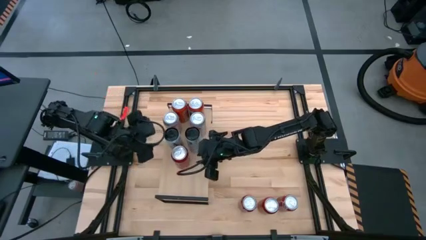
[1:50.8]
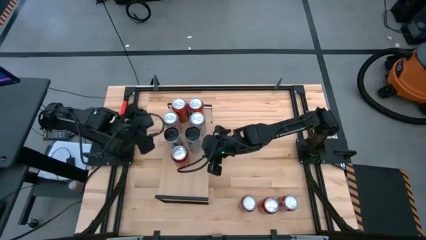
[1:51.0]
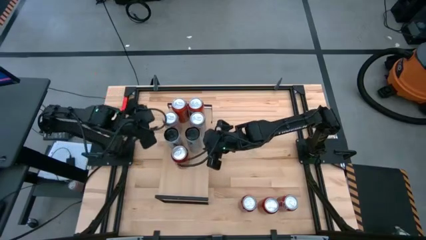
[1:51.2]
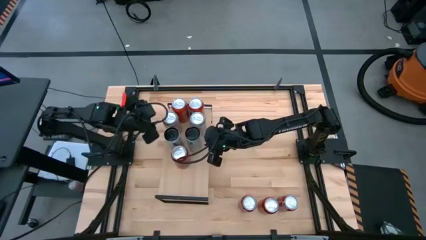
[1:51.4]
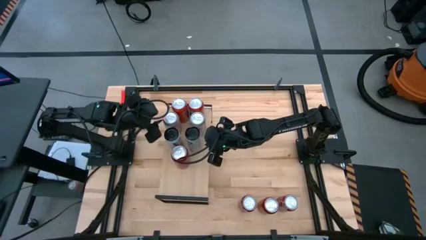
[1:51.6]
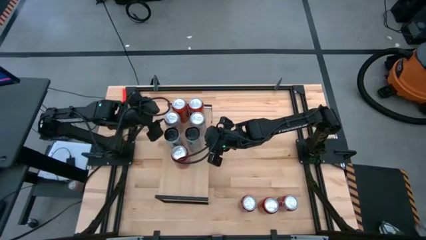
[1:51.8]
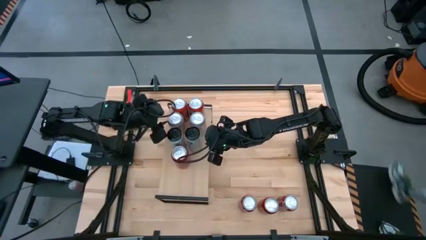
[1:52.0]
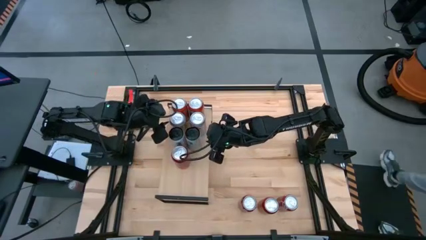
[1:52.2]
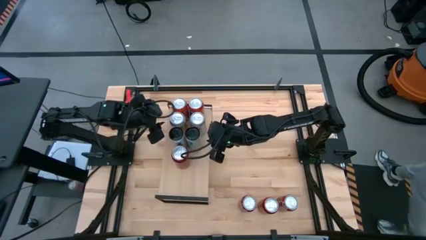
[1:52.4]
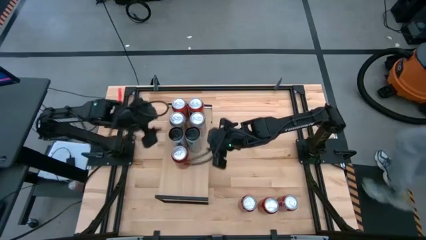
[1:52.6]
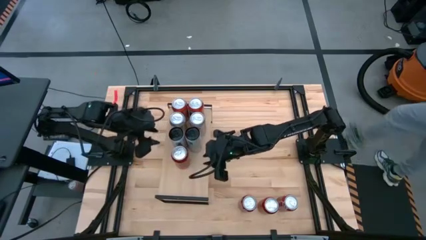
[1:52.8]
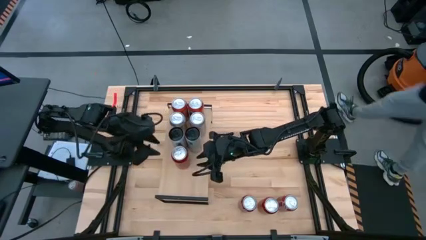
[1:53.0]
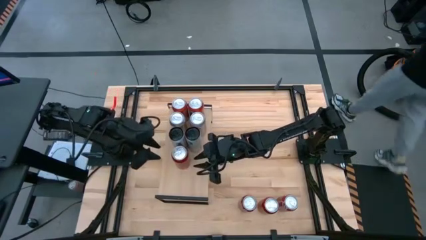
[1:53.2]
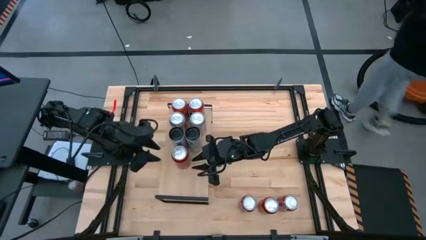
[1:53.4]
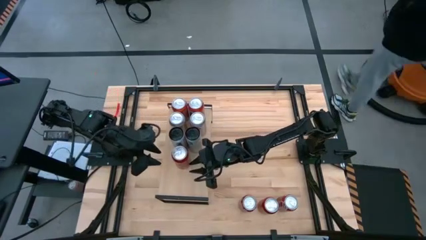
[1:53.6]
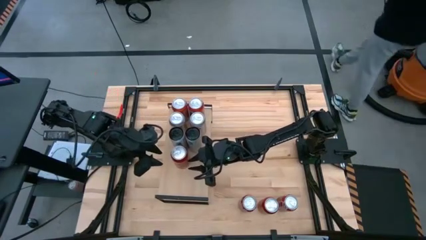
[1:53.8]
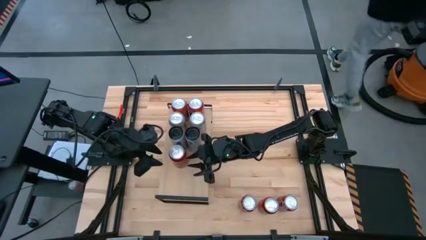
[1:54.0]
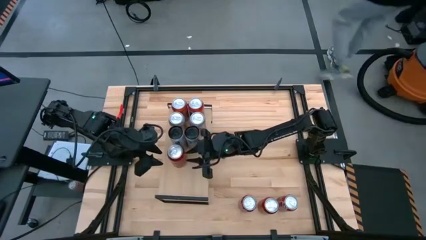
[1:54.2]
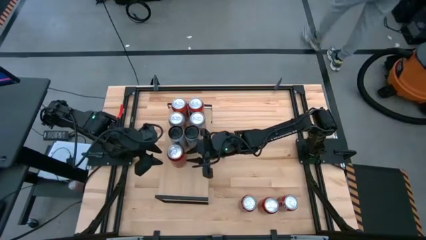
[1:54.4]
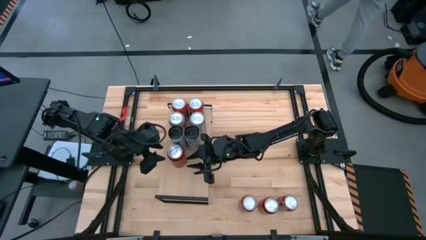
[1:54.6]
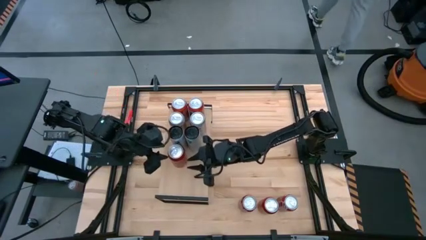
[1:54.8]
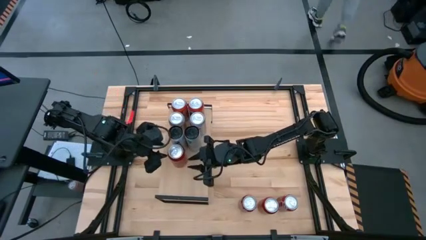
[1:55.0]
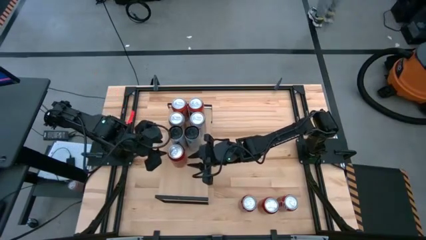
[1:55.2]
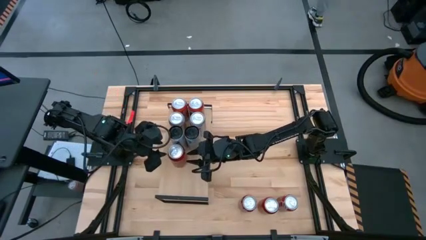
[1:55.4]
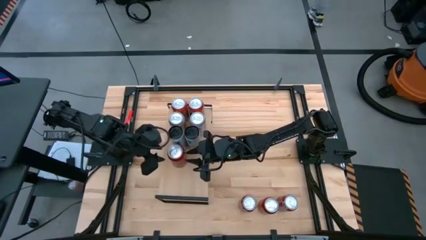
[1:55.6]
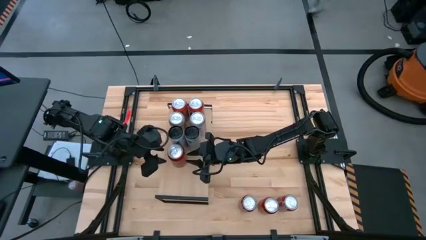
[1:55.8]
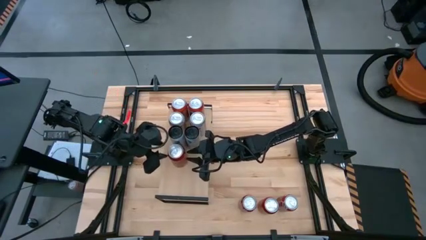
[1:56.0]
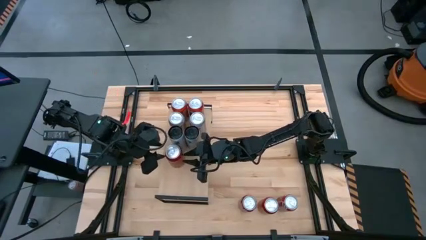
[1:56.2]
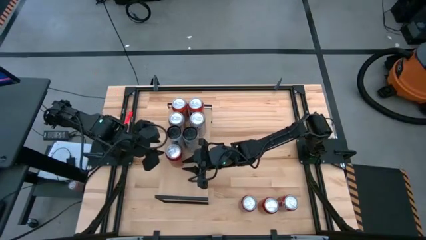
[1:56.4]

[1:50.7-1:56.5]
Task: Pick and place cans onto a shelf
Adjust the soda cans

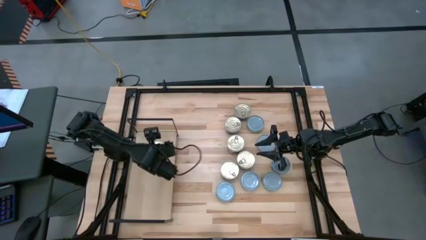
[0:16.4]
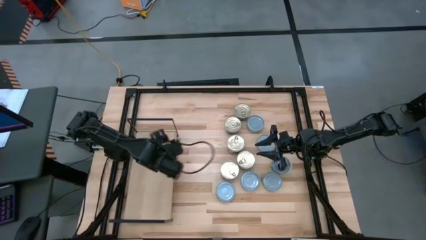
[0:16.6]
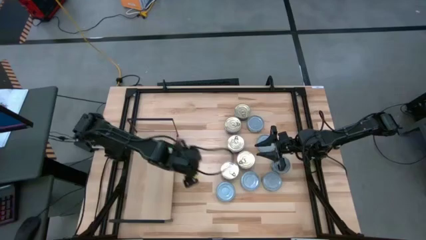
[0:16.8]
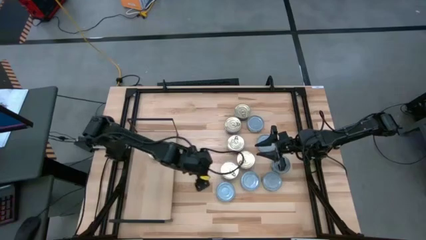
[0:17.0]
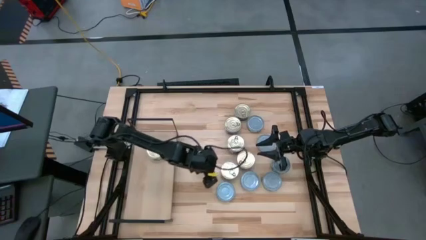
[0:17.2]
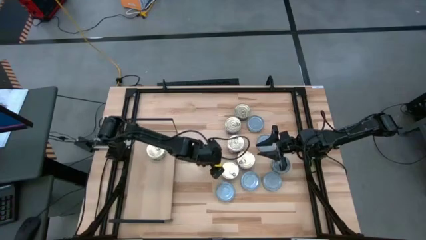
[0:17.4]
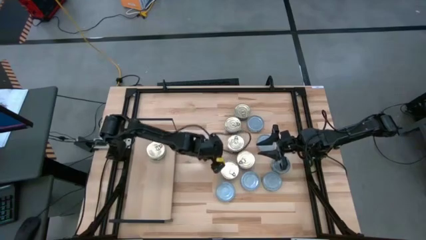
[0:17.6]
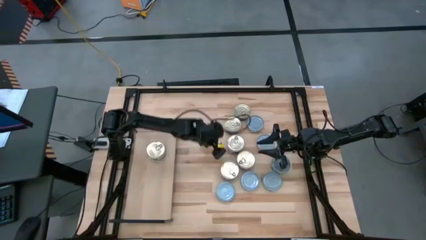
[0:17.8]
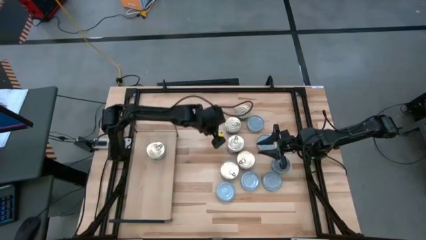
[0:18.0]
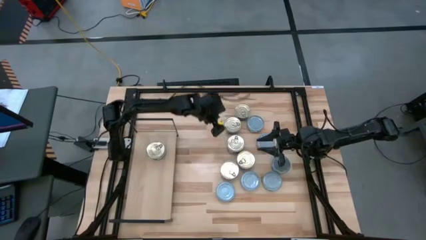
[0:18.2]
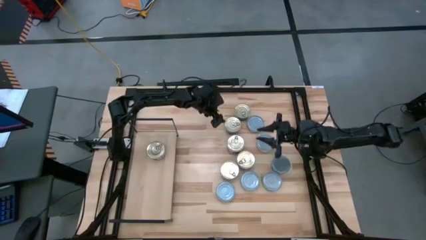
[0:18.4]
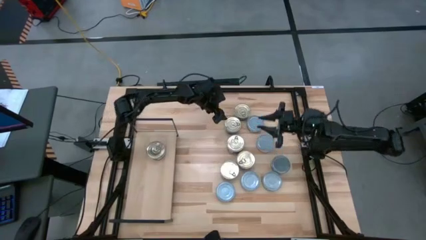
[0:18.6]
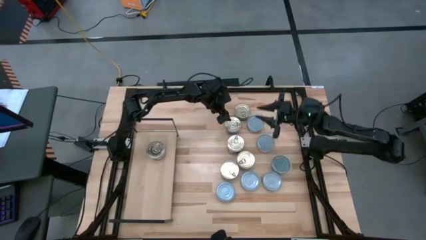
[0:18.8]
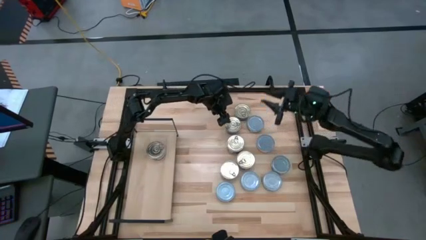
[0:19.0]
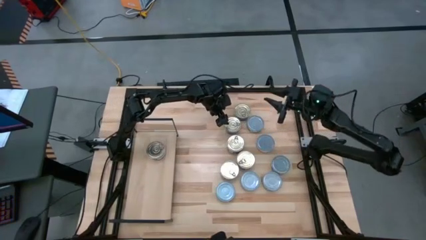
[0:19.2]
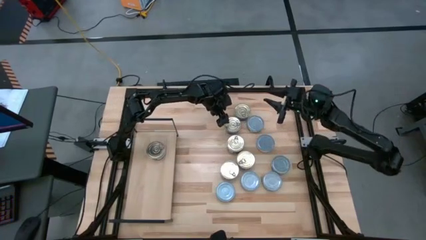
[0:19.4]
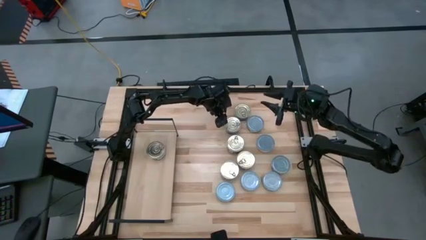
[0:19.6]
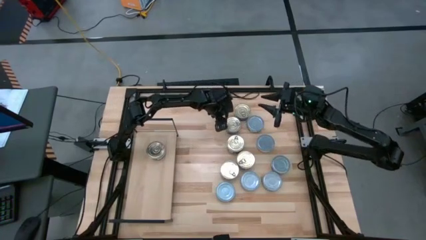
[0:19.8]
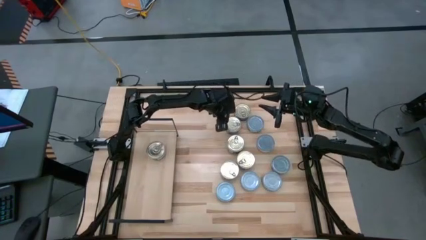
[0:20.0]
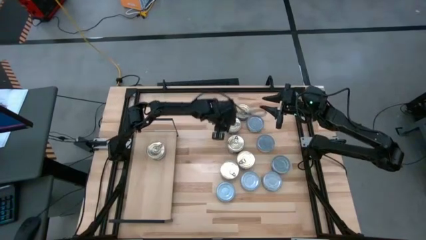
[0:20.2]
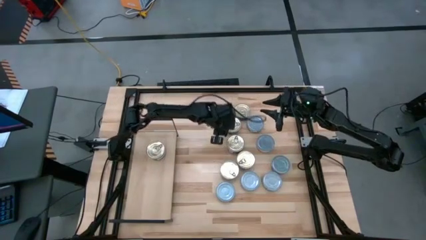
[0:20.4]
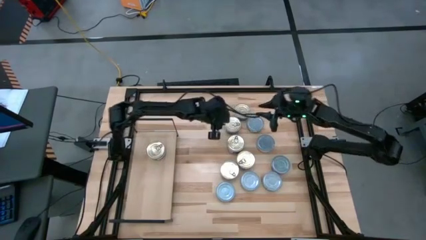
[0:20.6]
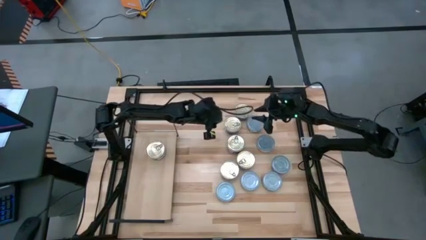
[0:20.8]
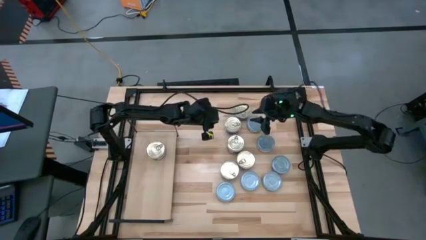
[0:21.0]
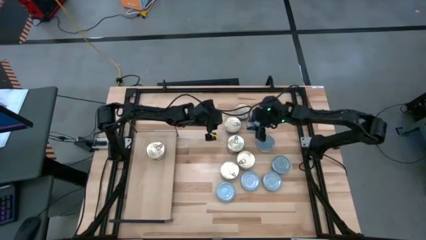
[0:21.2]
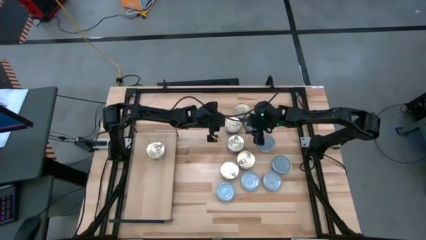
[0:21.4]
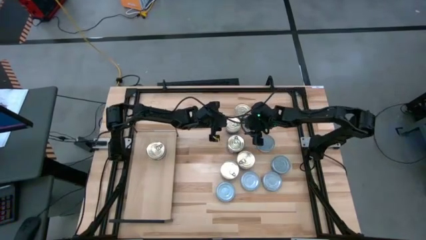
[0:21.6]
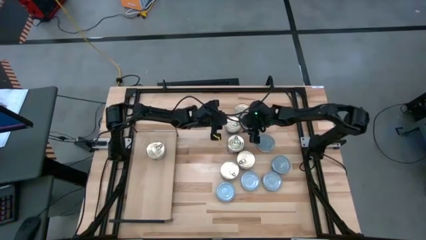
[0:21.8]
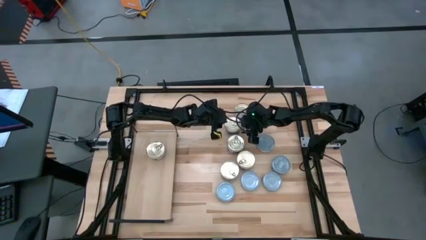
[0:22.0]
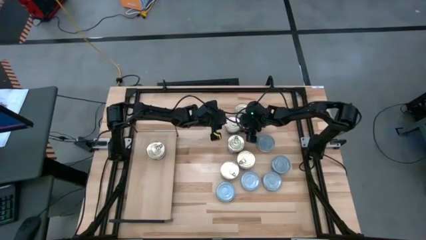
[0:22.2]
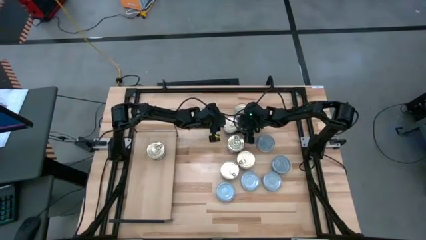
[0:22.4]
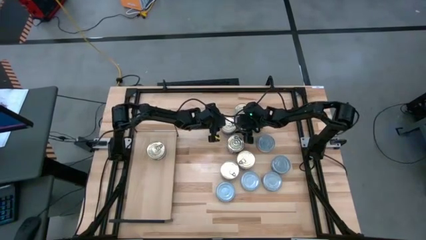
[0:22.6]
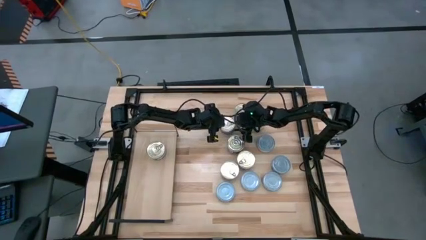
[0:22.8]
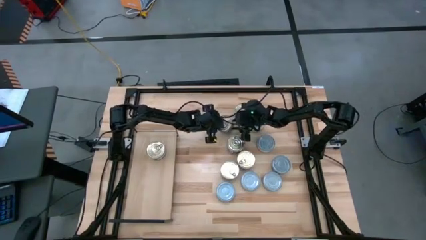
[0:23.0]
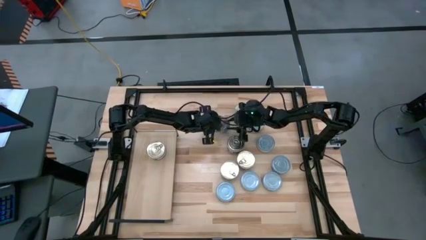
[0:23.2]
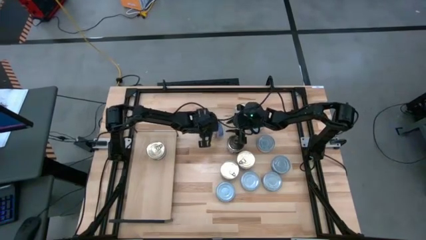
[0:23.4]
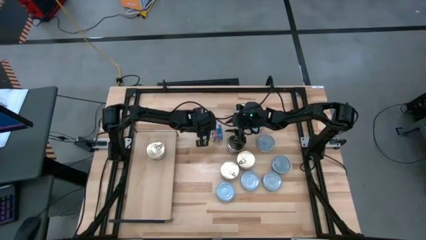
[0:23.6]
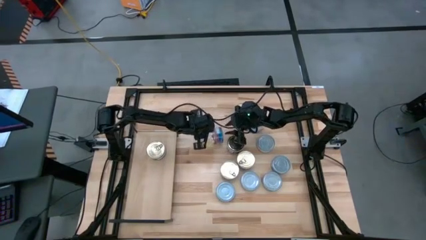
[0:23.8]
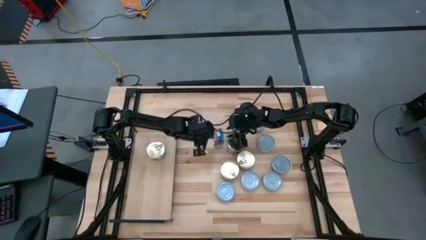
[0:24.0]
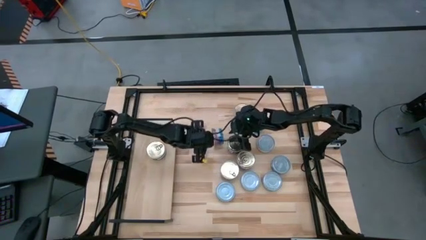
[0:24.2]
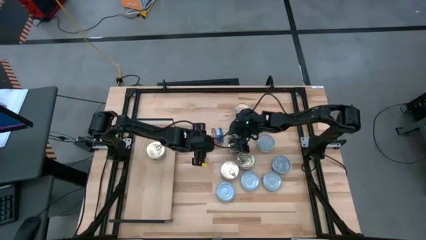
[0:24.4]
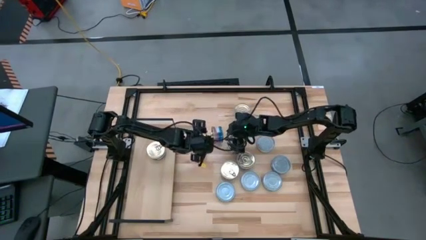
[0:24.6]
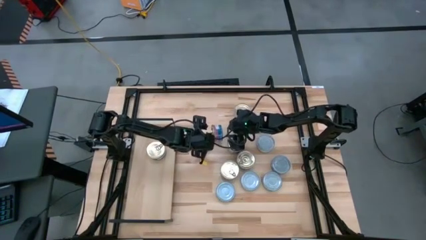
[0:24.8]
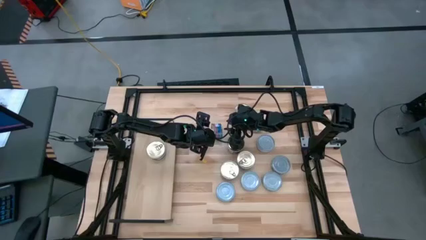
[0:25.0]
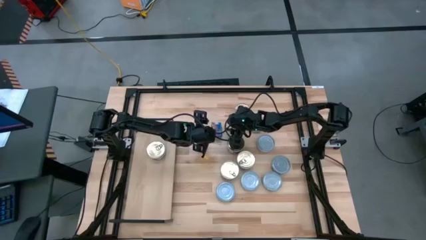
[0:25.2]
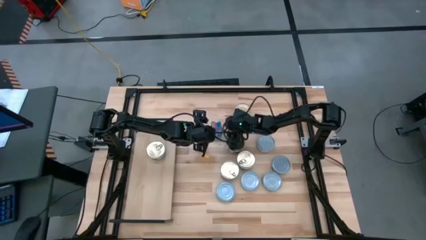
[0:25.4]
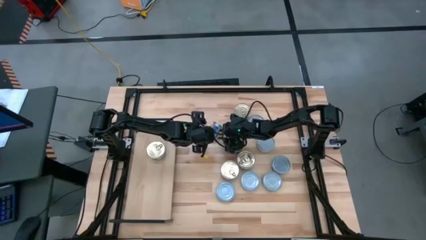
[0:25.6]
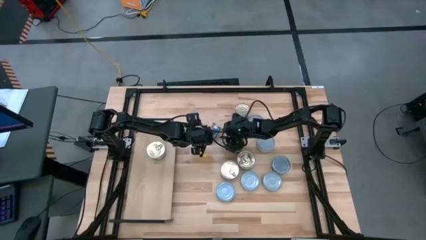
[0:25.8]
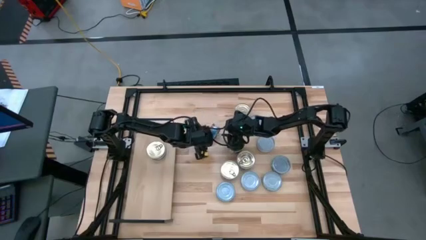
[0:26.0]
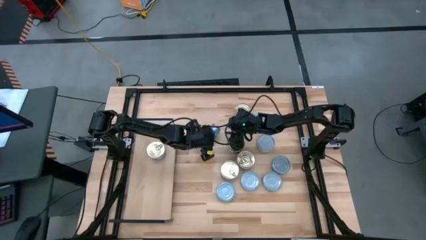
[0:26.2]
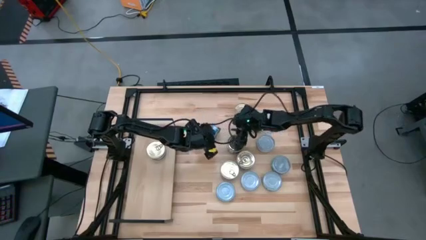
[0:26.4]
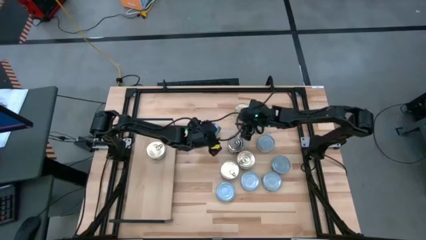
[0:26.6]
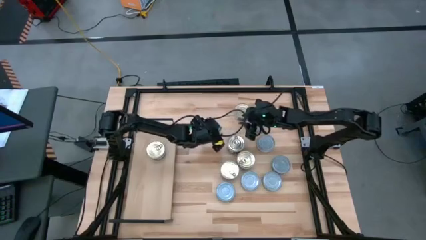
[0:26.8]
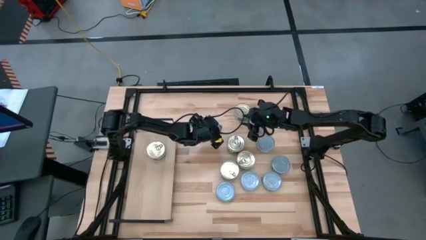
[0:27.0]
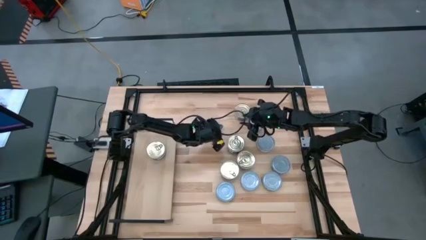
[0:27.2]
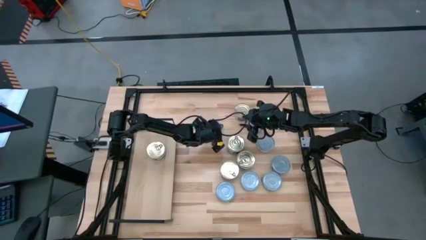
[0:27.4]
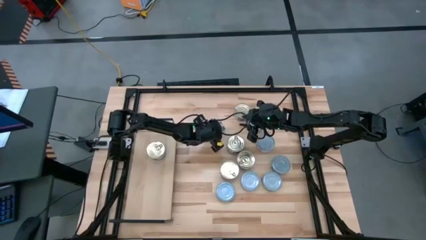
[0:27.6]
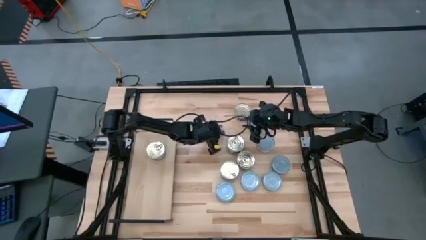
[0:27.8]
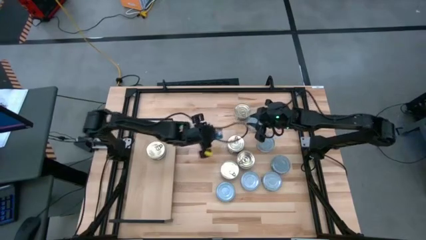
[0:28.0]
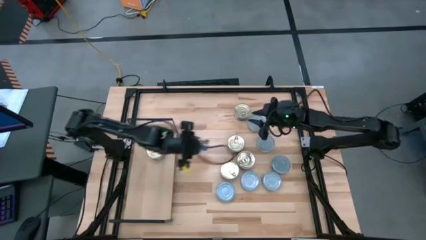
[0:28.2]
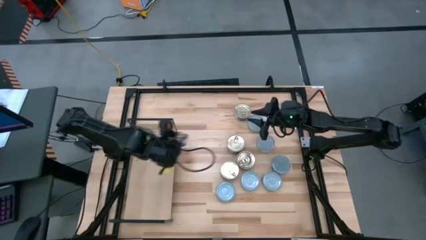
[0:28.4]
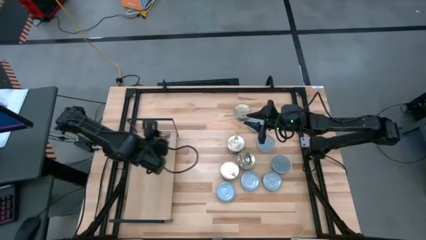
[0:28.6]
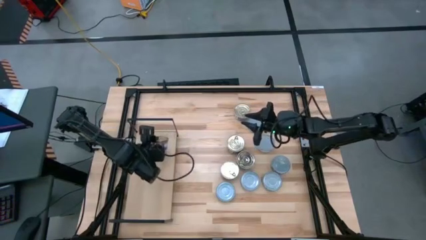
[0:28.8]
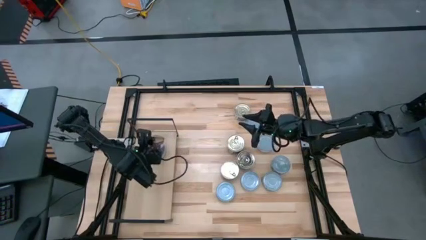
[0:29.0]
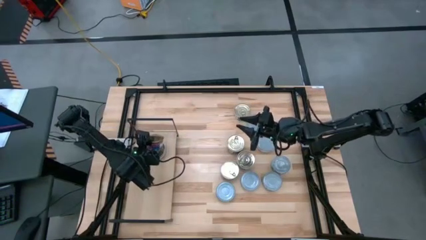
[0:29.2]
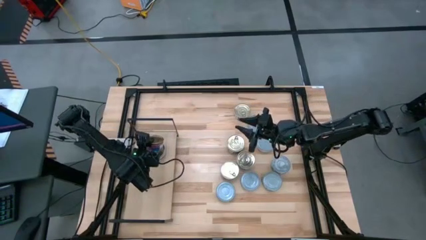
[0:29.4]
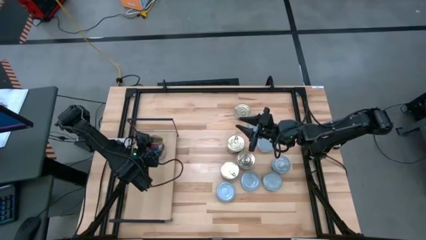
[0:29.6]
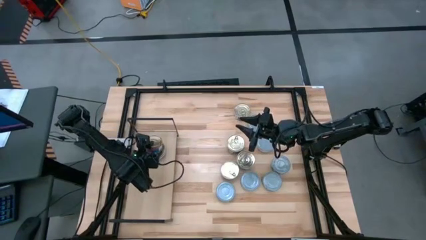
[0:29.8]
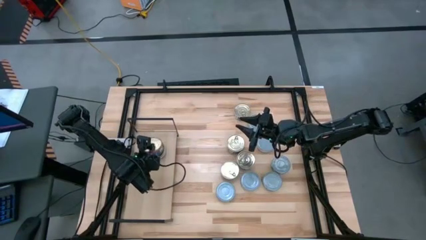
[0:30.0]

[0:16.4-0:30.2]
Task: Stack canned seafood by type on shelf
Stack the blue and pink tuna can on the blue and pink tuna can on the shelf
